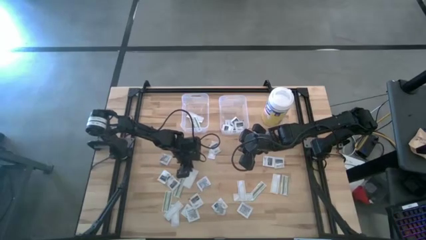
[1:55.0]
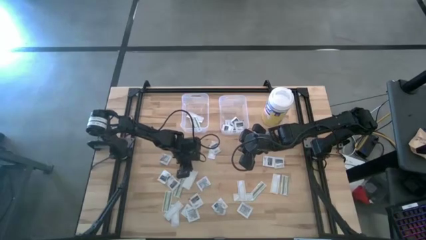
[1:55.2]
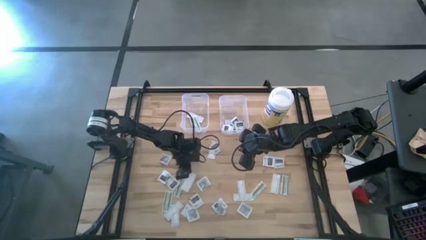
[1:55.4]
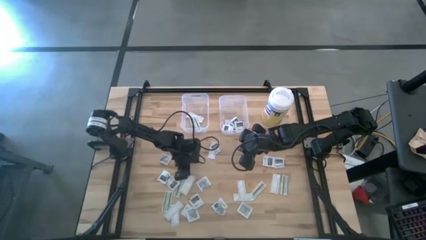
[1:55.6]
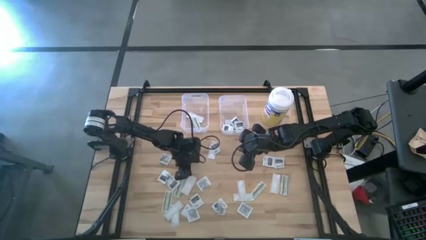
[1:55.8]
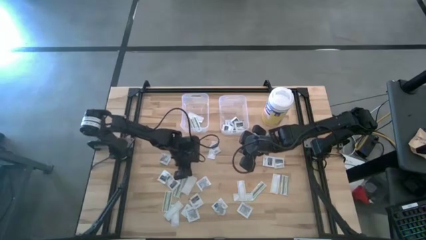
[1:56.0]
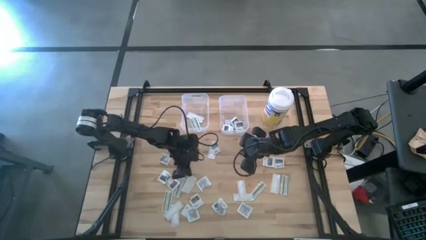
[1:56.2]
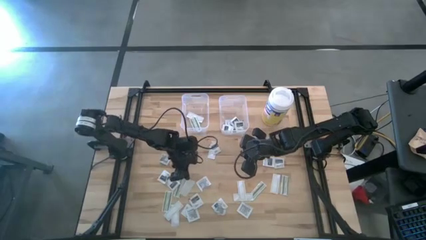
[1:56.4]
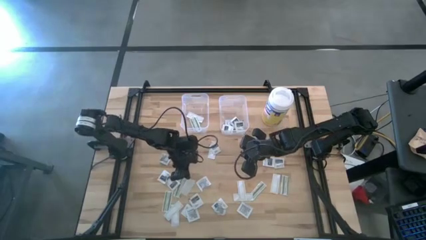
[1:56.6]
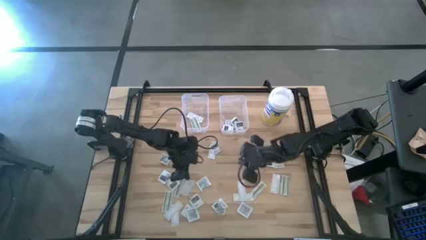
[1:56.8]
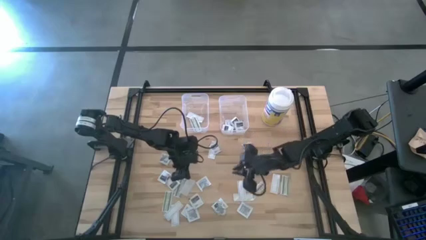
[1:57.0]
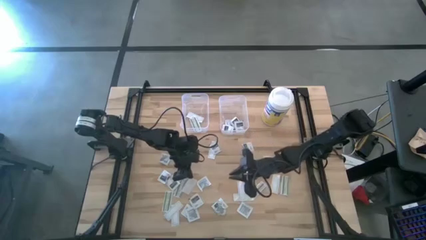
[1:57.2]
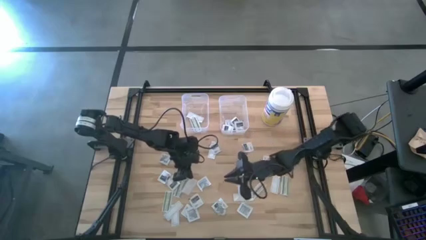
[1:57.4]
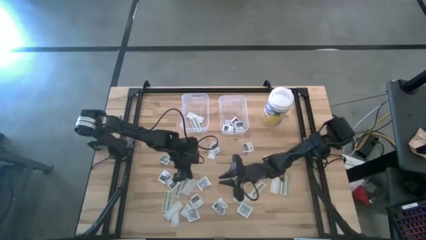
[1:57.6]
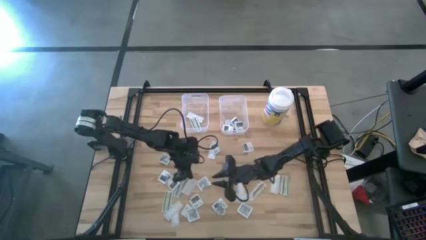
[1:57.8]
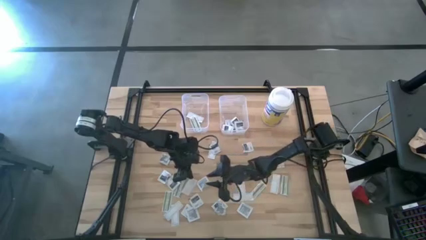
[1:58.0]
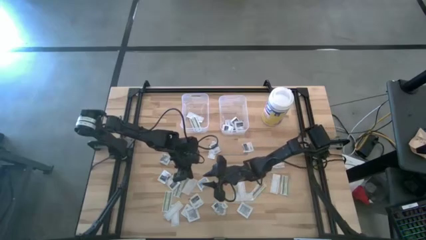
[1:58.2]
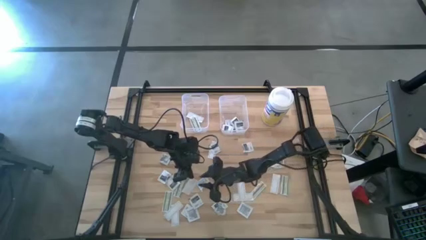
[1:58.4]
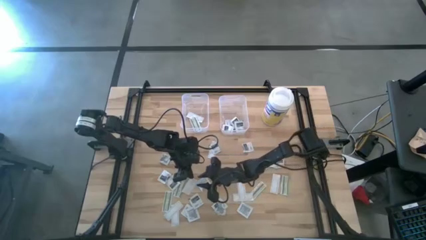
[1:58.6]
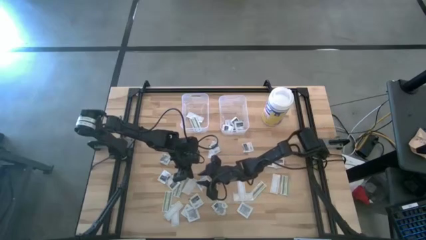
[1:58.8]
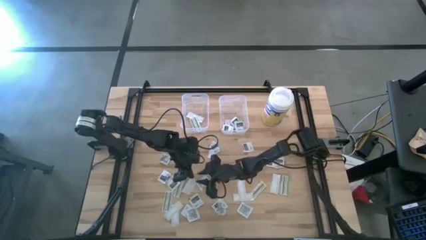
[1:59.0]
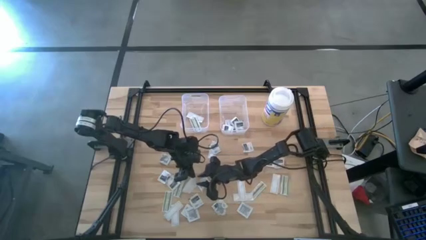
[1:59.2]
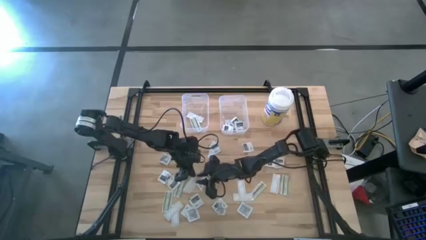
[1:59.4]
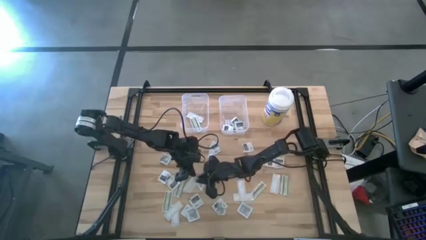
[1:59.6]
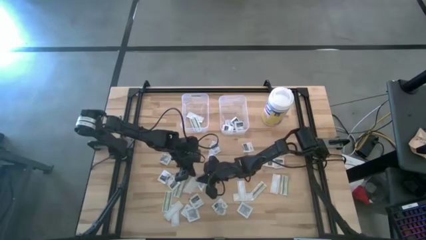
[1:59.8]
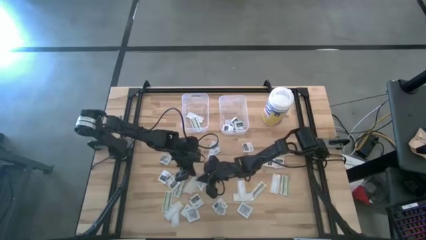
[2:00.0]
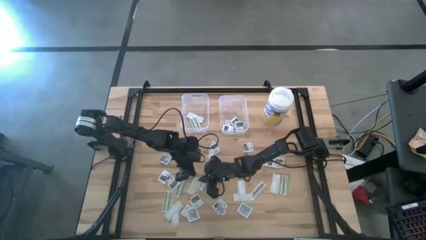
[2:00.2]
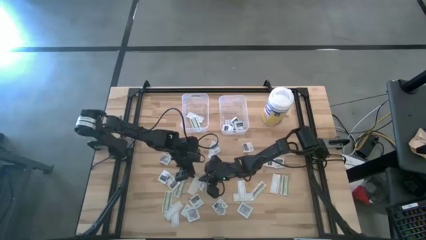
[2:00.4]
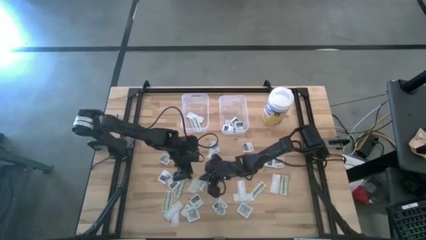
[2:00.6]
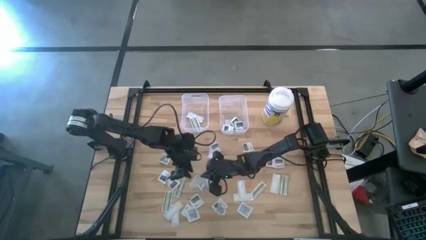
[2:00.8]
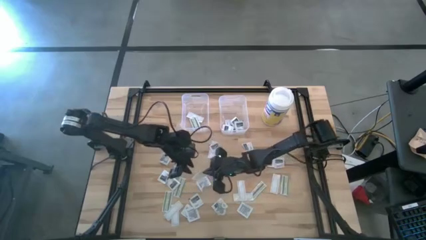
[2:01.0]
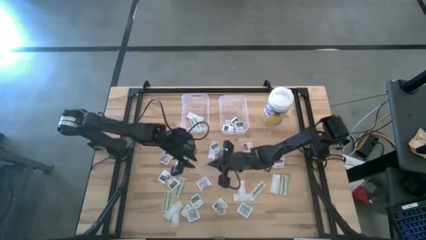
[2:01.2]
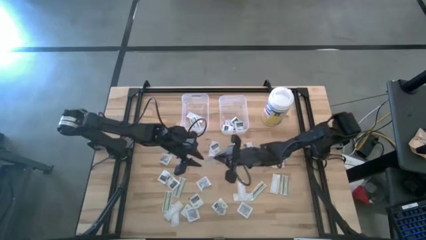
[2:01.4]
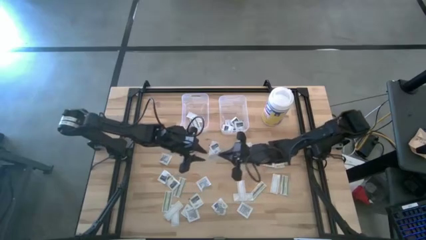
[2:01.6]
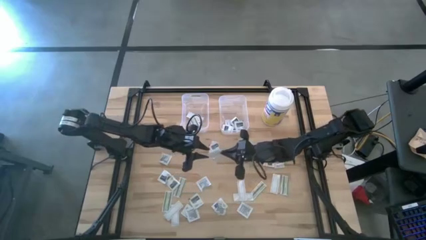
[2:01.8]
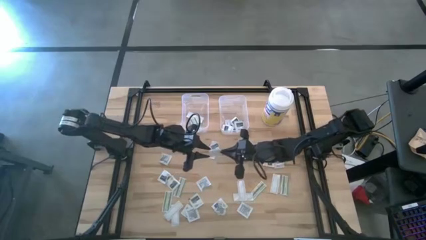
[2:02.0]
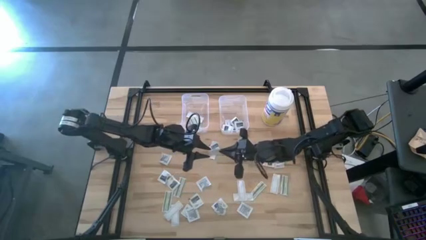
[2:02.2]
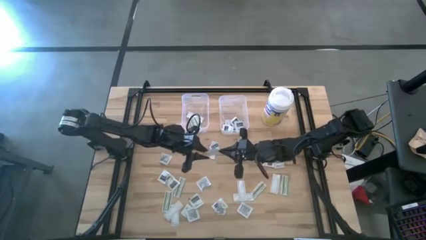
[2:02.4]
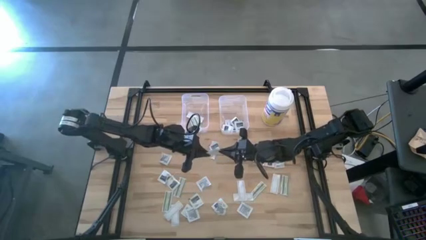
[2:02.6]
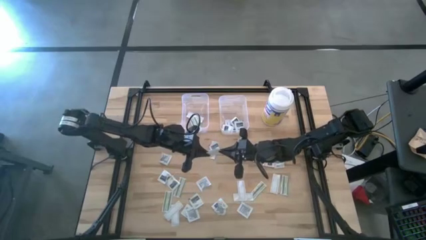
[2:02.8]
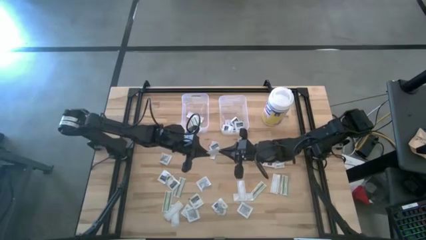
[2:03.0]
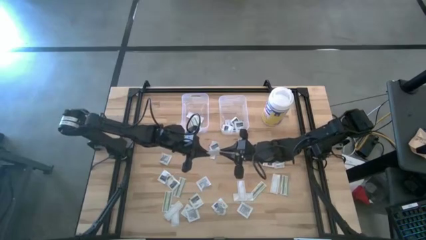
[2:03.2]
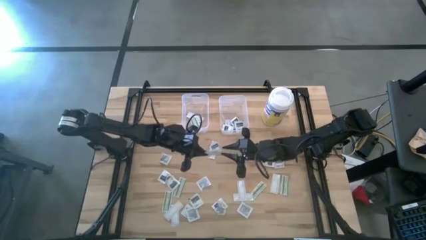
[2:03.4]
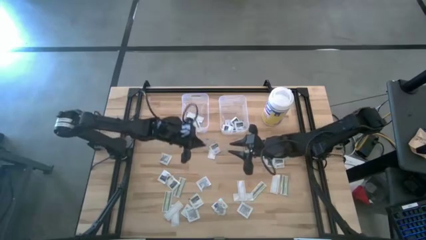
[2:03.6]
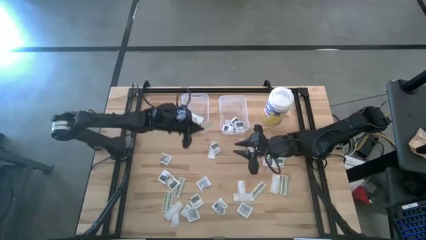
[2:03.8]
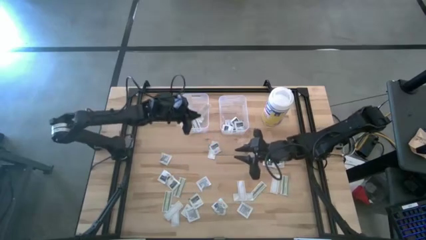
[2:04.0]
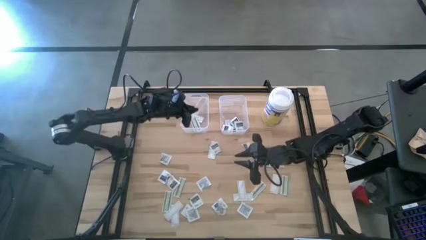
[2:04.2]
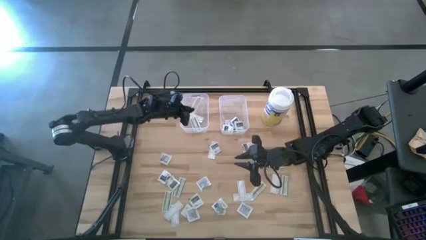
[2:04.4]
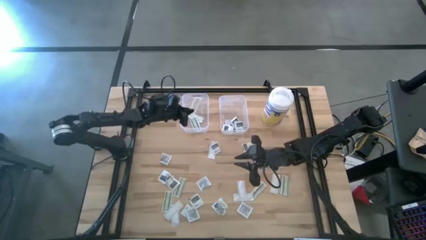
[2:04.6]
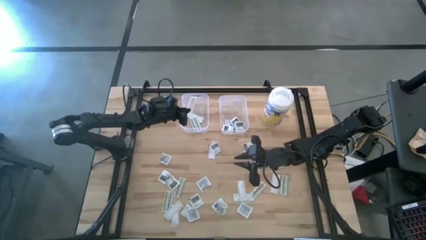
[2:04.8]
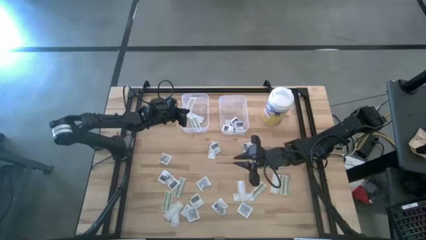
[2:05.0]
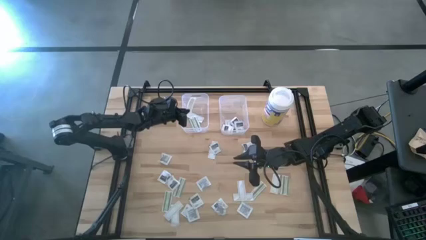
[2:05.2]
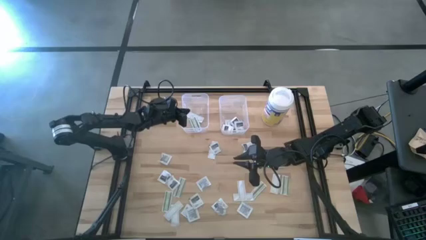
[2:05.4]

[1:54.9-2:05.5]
Task: Pick & Place First Aid Supplies
Put the green bandage pack into the left transparent bin

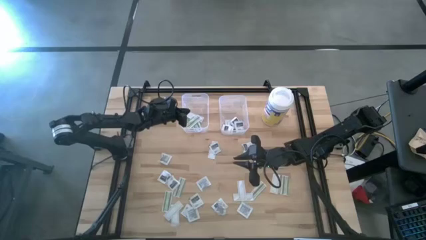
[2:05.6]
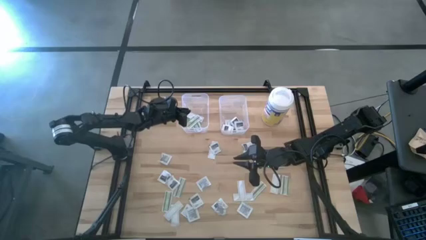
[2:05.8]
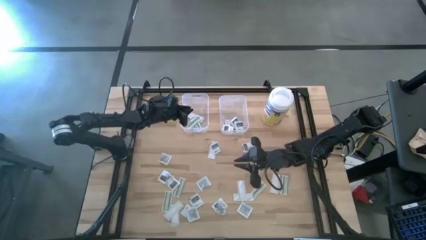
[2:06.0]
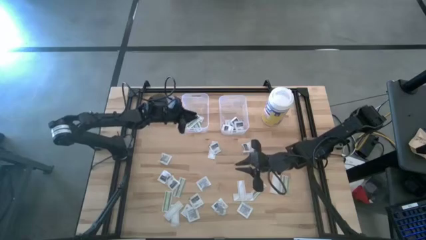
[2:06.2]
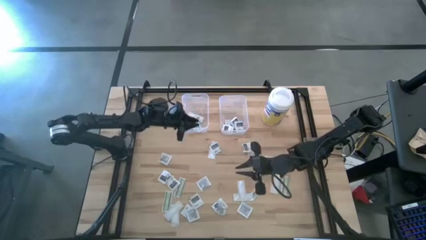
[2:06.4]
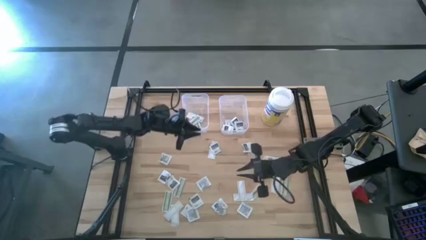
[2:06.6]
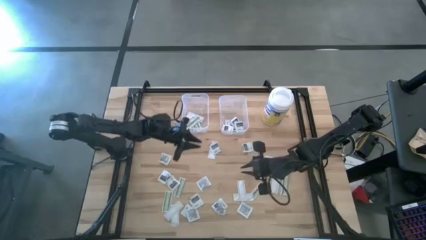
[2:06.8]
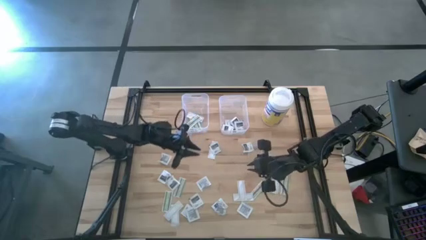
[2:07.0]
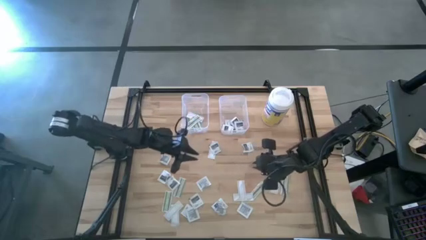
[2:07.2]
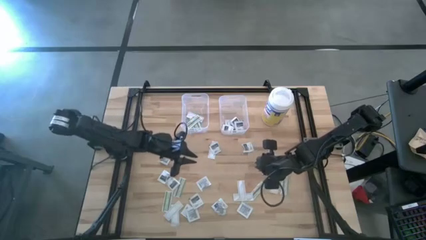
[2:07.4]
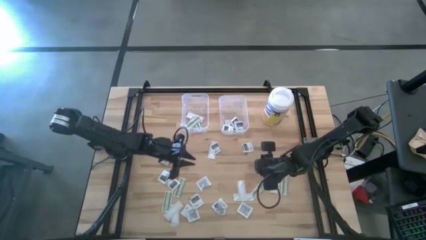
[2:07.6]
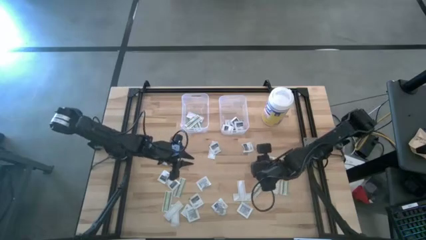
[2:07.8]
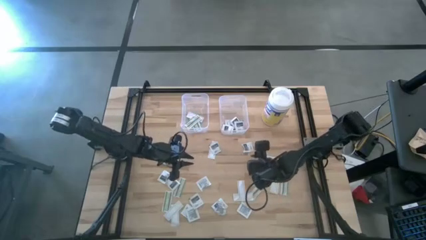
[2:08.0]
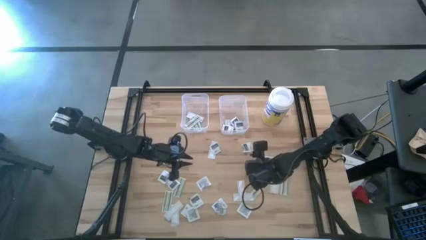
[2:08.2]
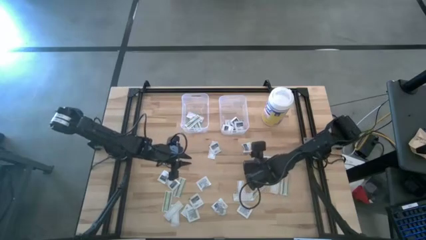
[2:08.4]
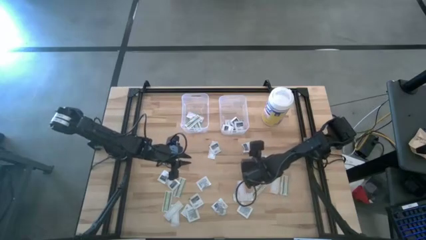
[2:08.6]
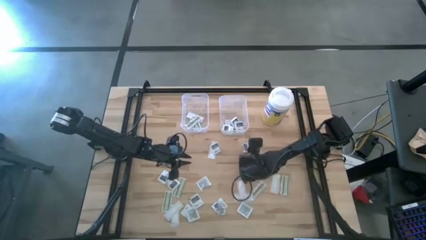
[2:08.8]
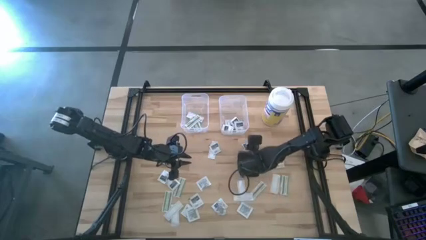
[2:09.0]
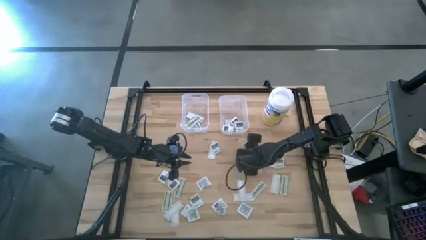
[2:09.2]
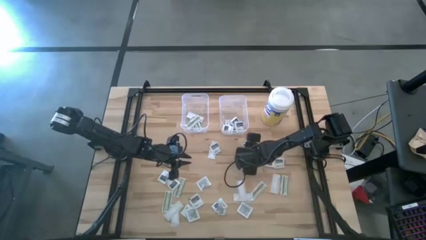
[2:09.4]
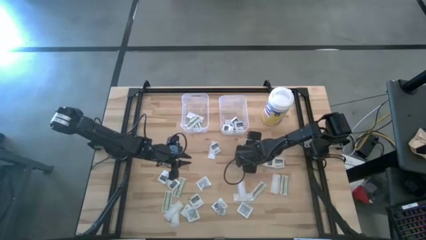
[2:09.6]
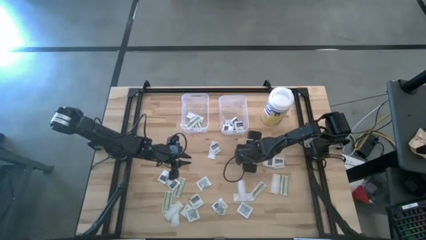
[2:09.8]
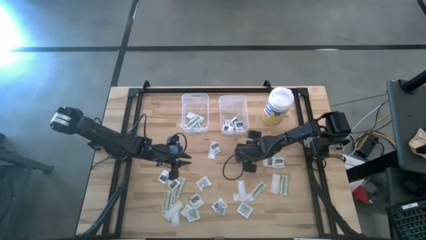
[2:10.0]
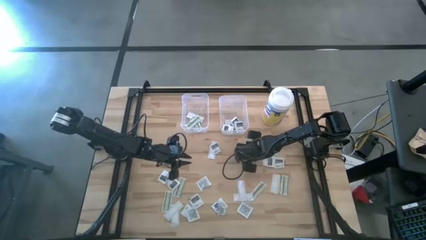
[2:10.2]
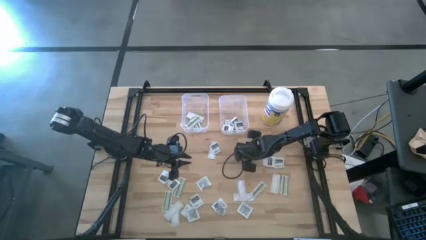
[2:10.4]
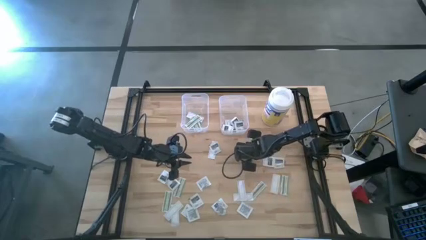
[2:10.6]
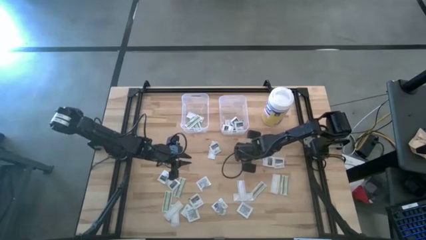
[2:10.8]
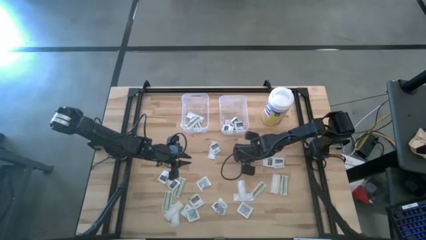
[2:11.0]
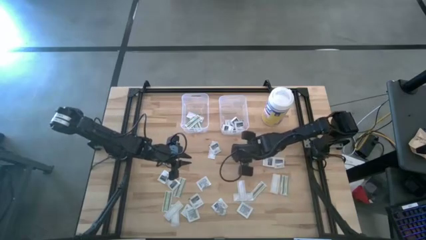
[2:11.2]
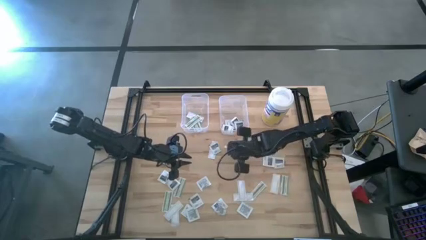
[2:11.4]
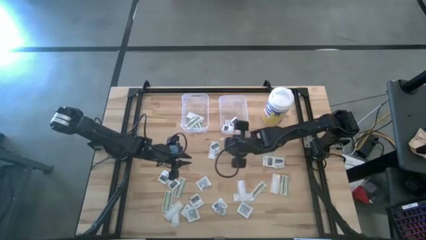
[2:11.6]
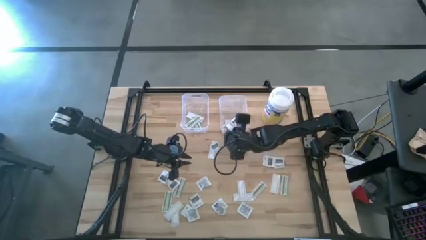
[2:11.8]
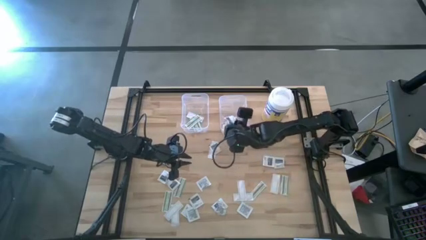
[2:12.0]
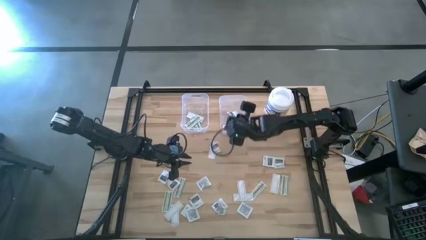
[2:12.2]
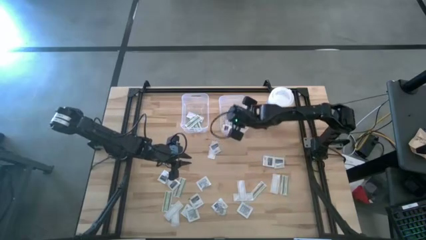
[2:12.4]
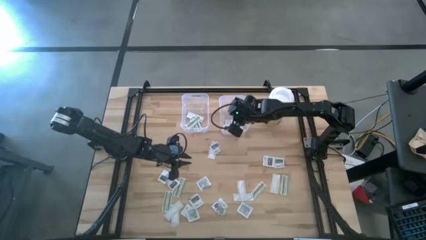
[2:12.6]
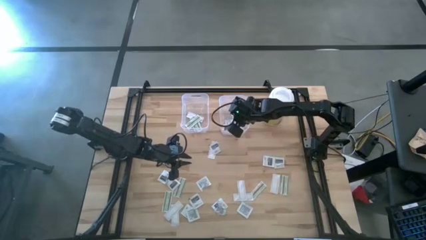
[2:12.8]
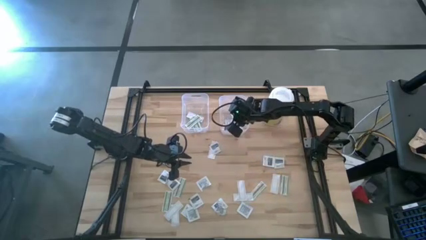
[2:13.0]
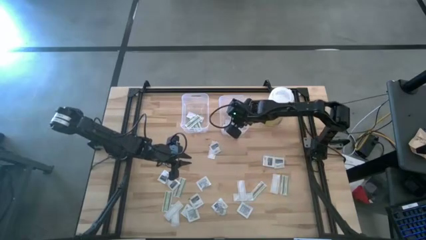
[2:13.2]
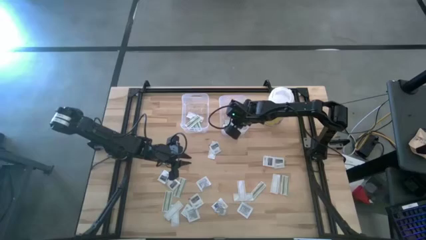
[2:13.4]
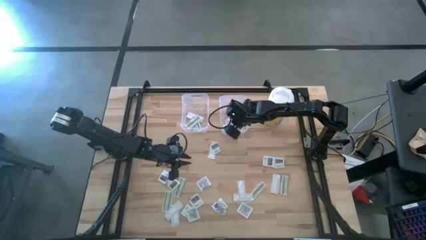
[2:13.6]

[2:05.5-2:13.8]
Put the gray towelette pack into the right transparent bin
